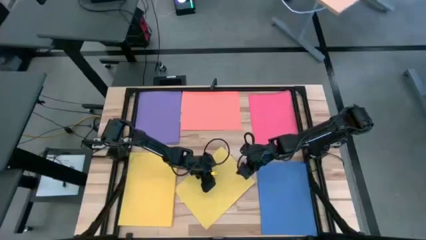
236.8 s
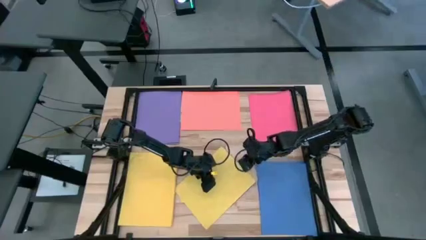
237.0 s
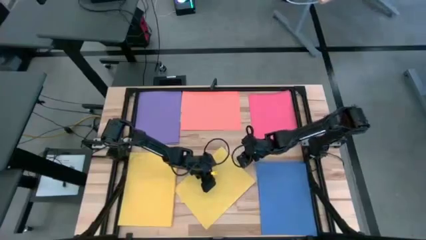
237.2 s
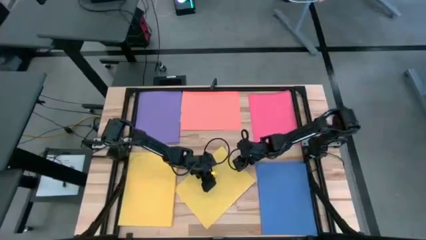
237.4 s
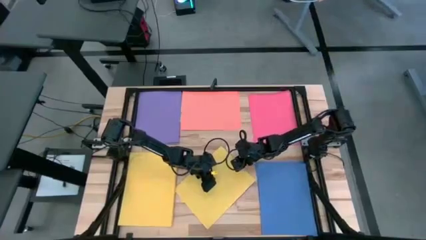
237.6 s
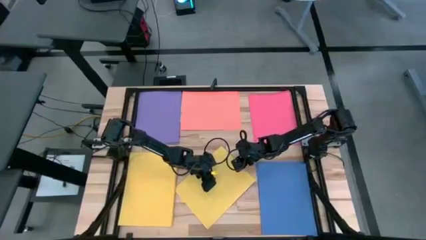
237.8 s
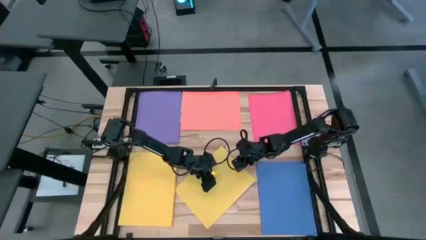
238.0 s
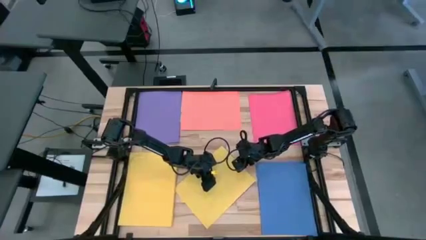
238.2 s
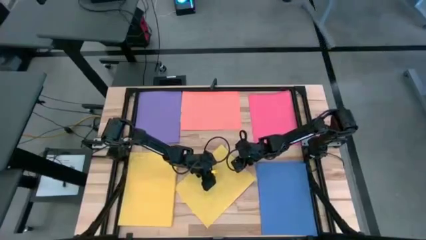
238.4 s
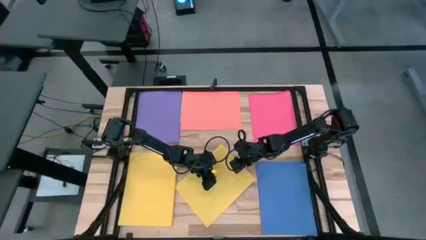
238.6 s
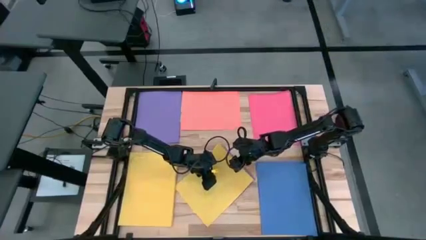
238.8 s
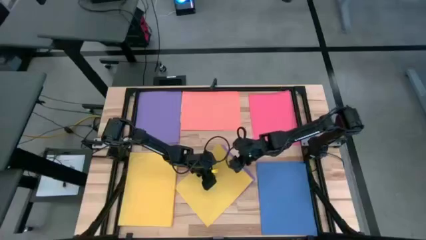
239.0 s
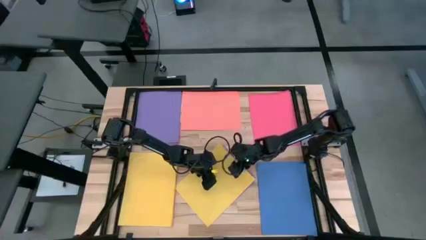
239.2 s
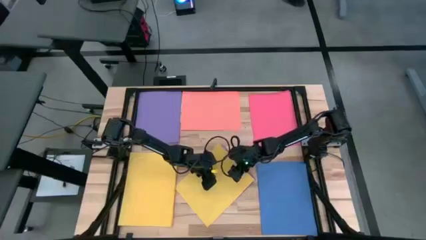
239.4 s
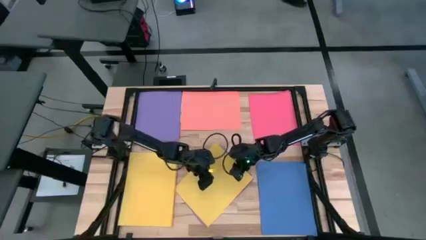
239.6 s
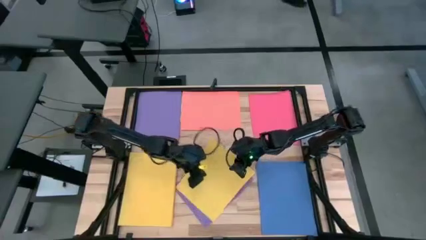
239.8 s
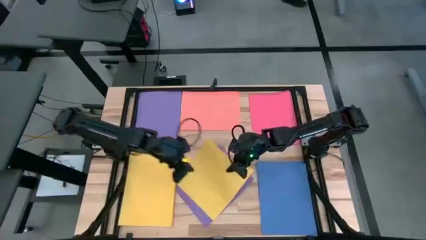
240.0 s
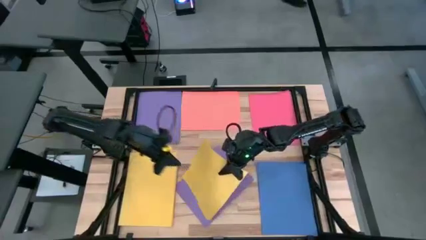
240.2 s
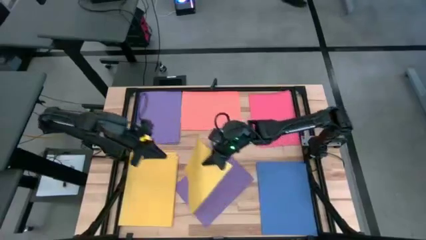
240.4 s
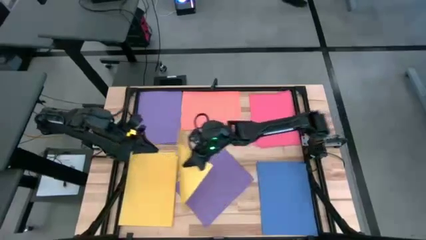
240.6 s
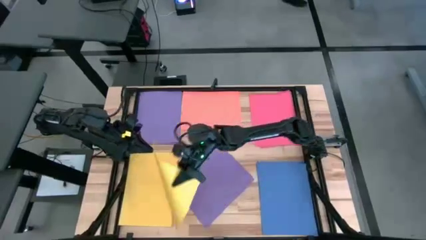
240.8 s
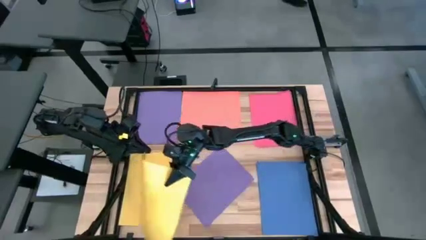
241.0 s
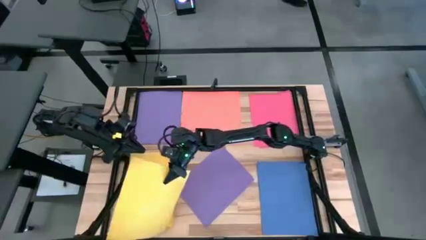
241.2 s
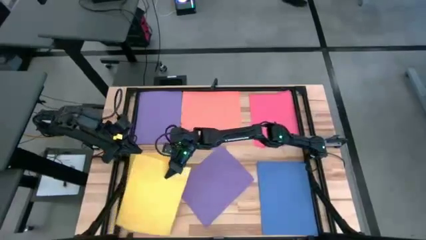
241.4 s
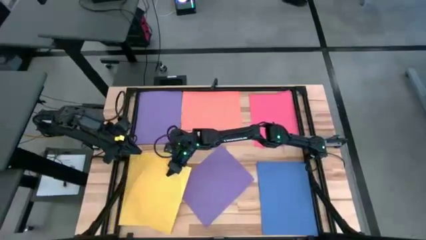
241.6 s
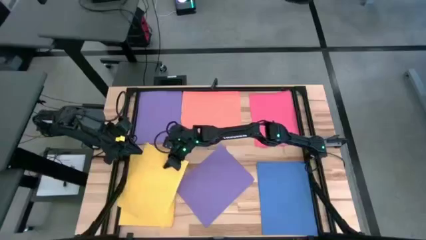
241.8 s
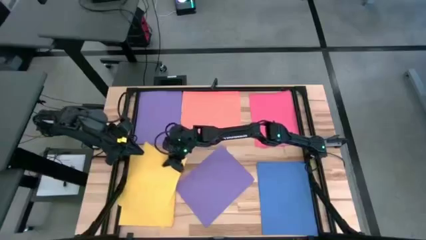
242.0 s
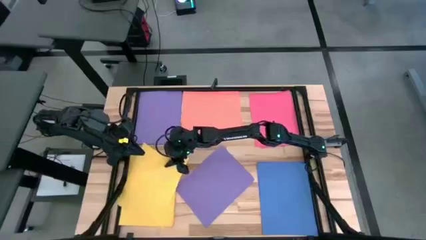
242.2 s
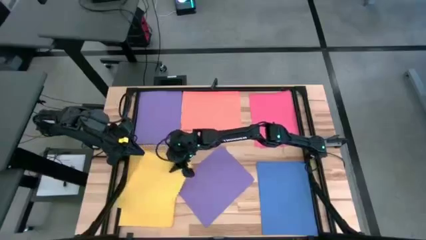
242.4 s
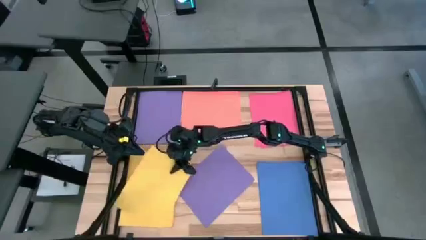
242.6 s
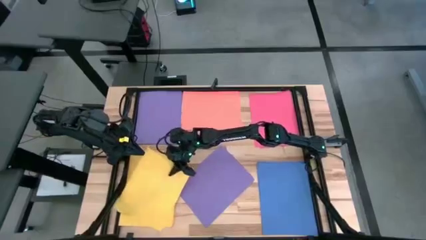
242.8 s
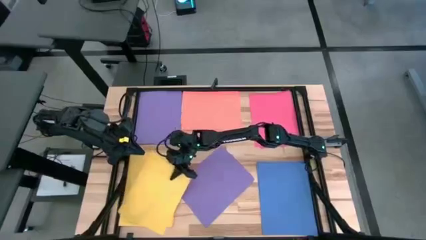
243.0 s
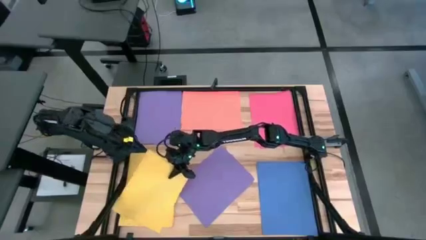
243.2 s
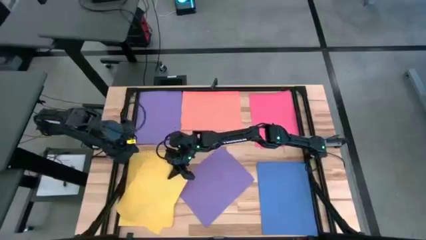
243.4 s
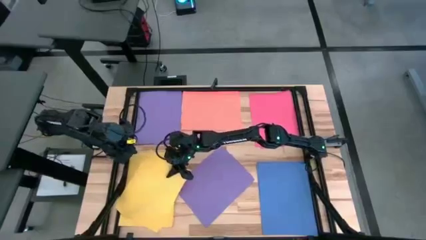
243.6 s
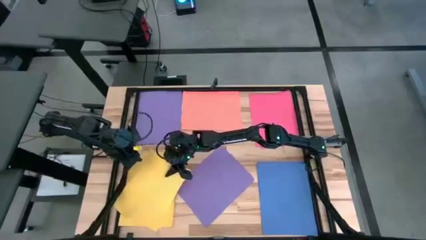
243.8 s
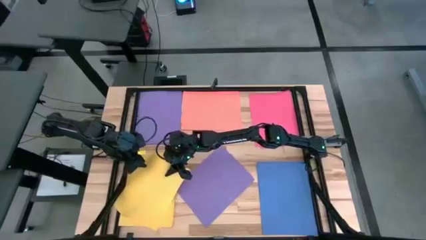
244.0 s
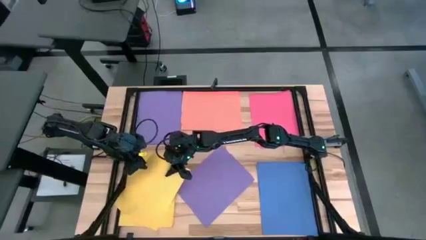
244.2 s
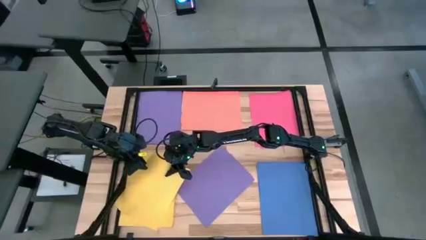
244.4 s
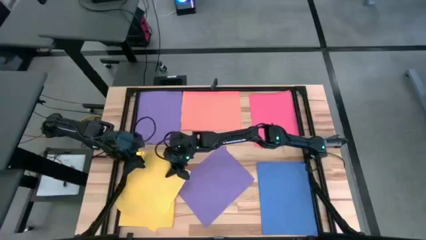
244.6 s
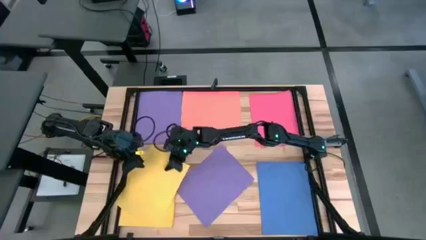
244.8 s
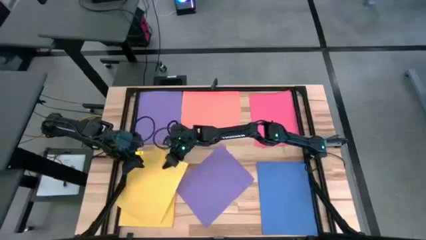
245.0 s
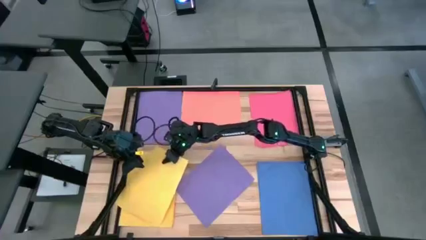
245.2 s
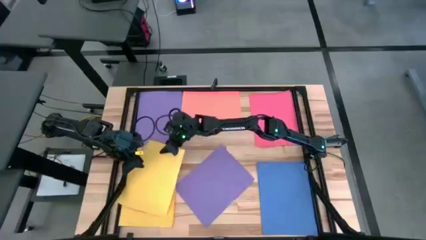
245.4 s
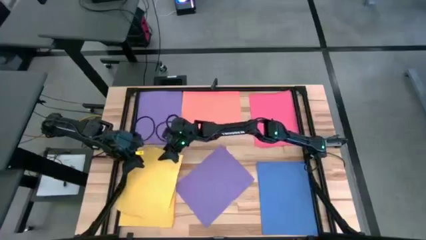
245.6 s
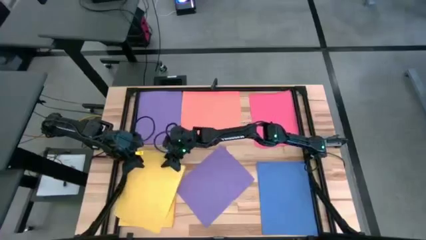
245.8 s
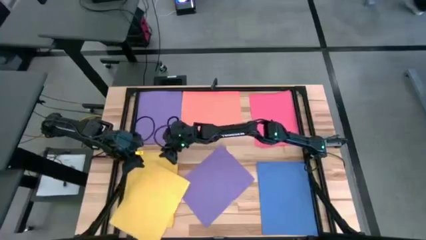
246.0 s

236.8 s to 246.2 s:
Task: Organize paper
Stack the yellow paper on top of the other yellow paper

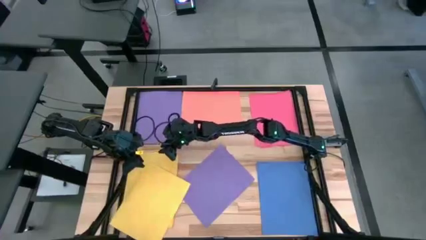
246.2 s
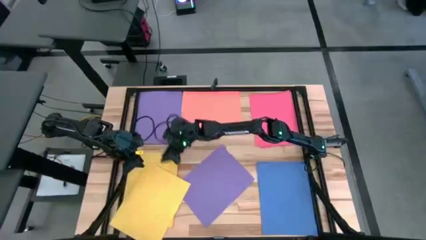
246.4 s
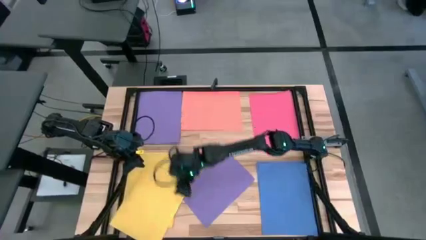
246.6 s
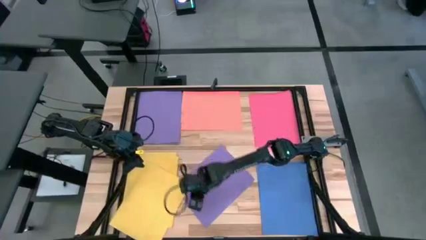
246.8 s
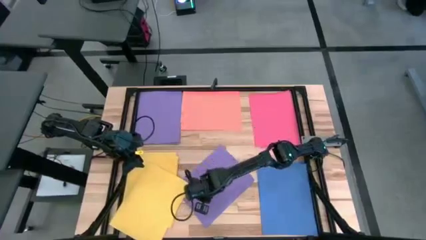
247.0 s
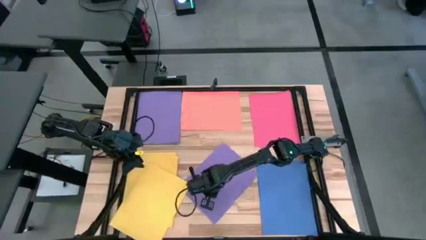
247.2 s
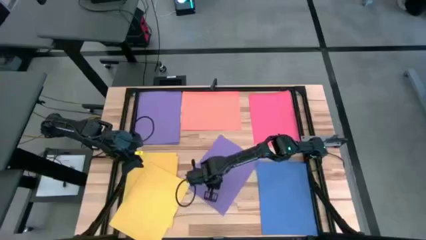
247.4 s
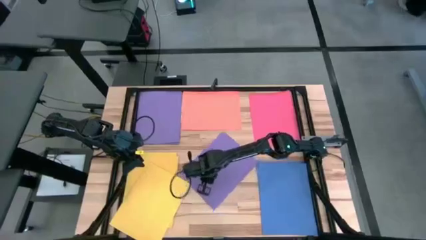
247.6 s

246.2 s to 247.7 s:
Adjust the bottom purple paper

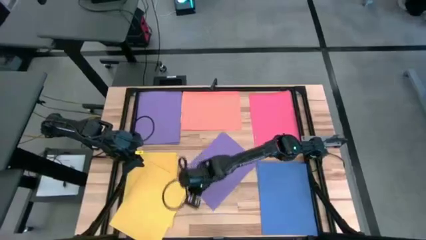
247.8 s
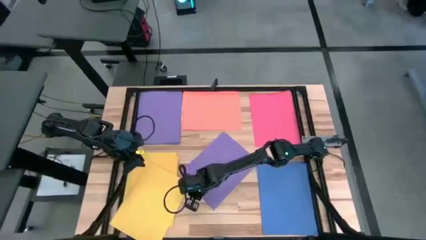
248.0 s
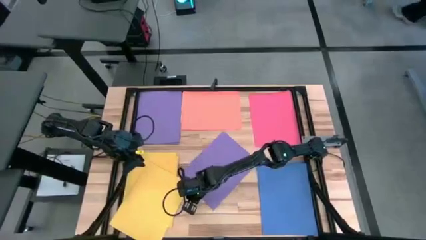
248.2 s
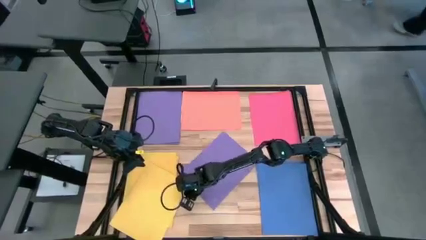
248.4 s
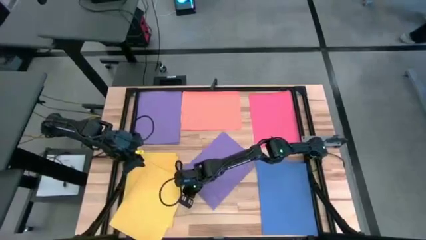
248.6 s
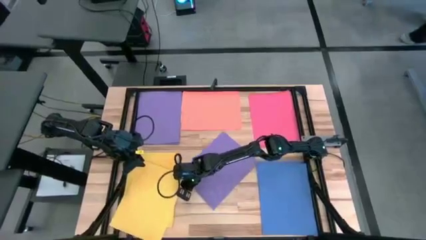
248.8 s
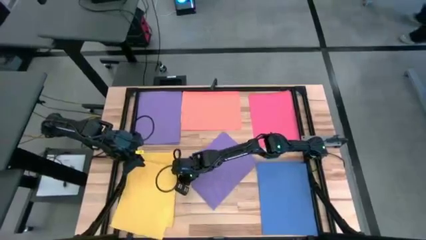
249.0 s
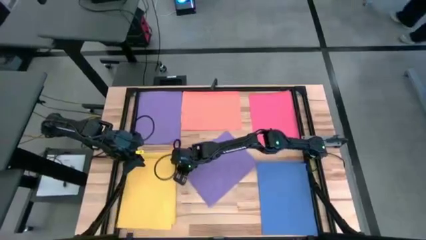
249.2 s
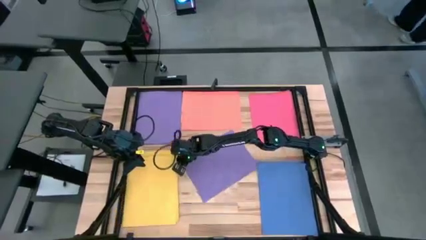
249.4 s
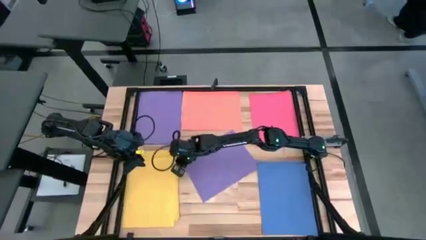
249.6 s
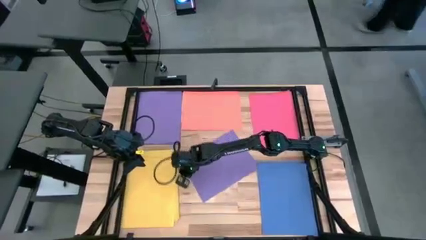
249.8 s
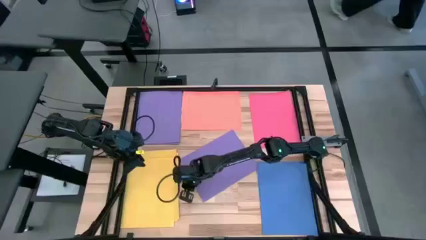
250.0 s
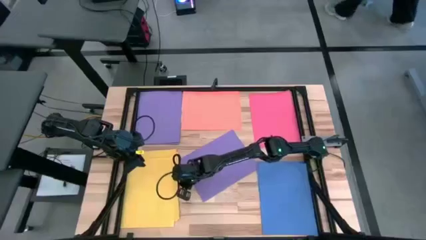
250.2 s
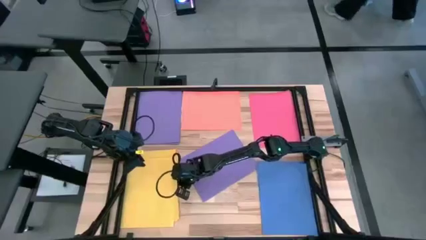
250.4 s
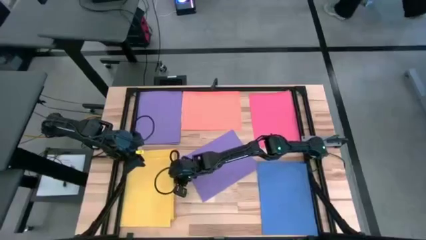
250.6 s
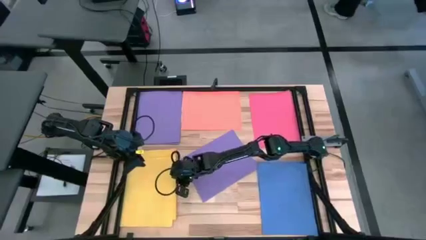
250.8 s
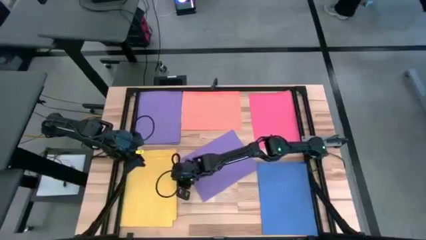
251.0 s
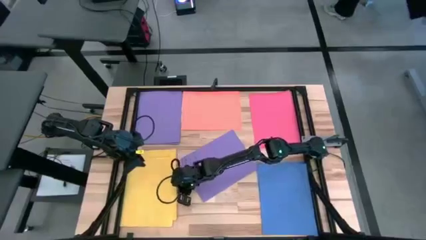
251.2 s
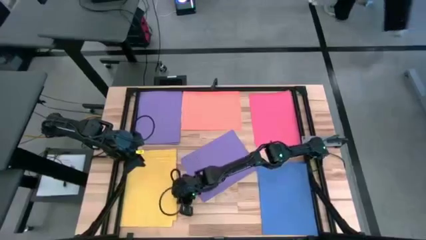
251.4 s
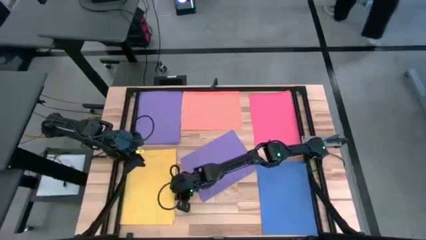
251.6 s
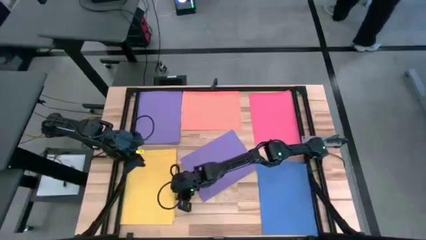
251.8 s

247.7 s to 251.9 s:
Adjust the yellow paper

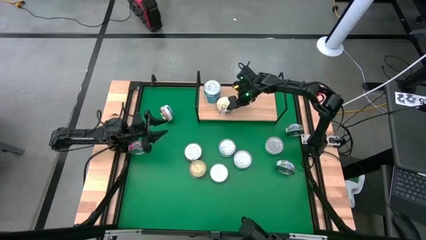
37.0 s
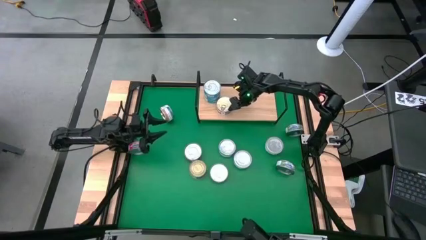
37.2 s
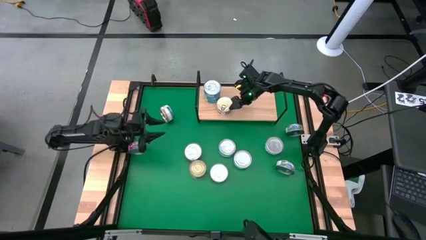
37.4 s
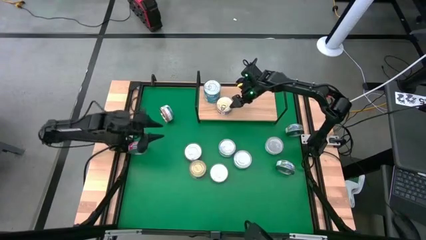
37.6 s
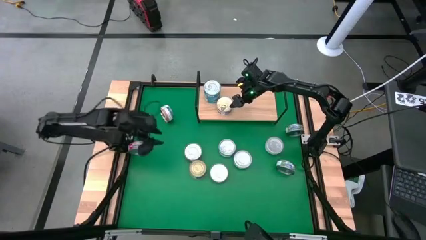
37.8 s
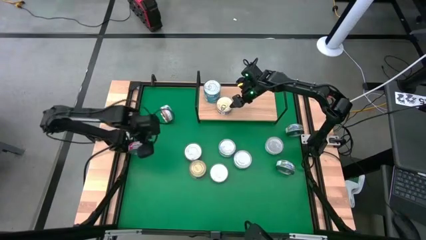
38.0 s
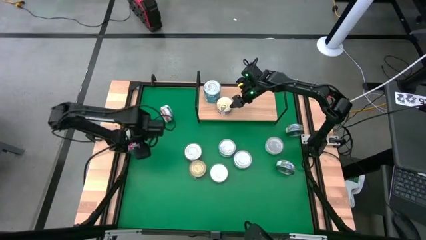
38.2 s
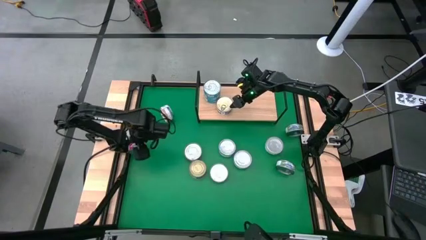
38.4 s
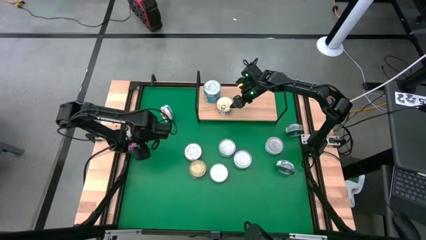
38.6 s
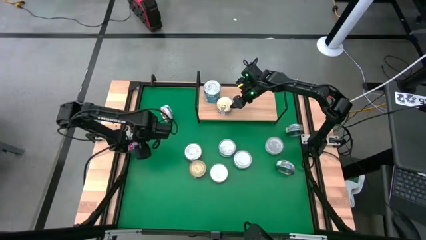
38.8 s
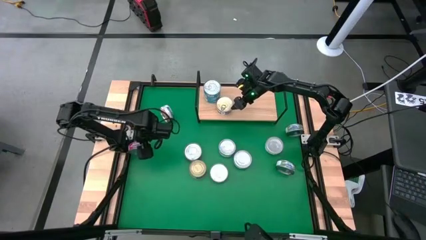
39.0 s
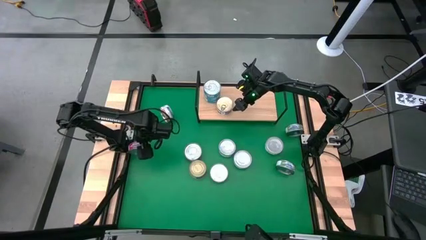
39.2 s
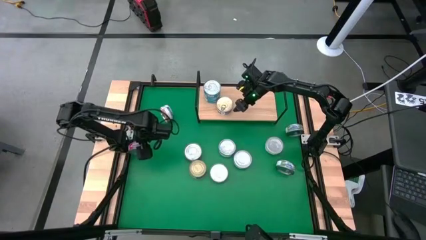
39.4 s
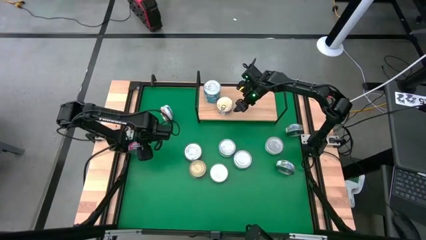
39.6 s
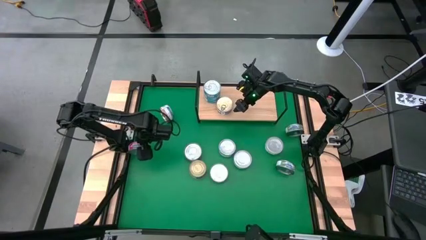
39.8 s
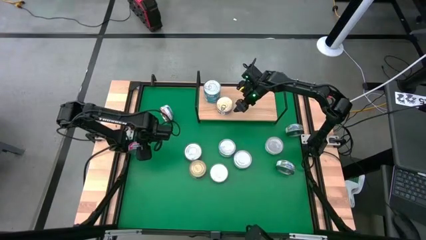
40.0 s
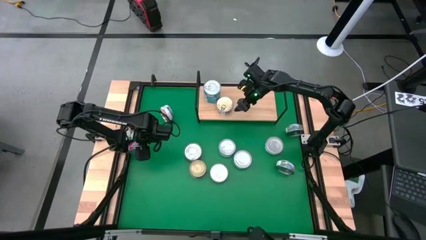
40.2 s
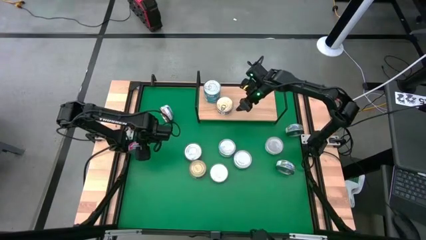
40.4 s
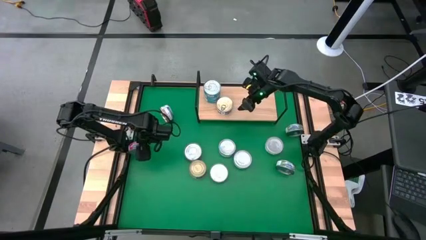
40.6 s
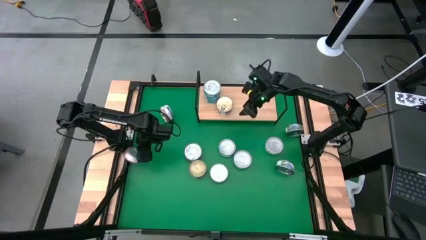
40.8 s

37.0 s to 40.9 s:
Task: Stack canned seafood by type on shelf
Put the red tuna can on the shelf
